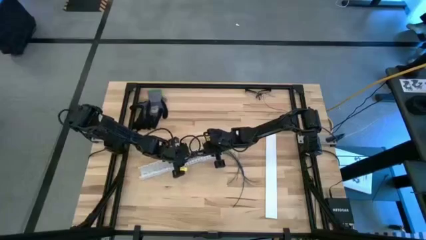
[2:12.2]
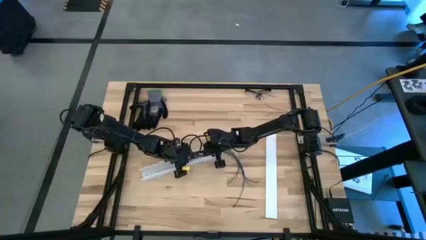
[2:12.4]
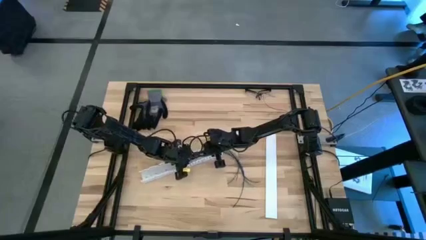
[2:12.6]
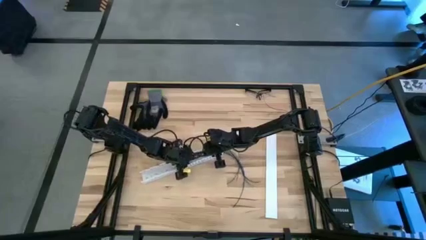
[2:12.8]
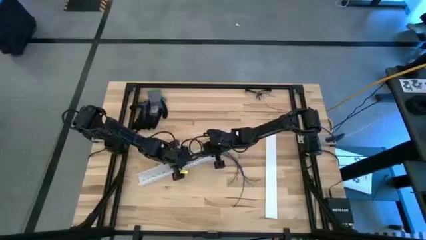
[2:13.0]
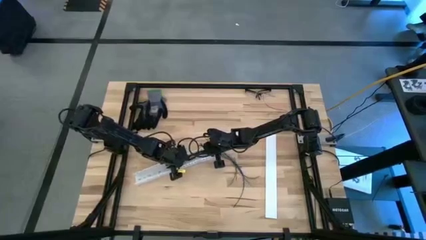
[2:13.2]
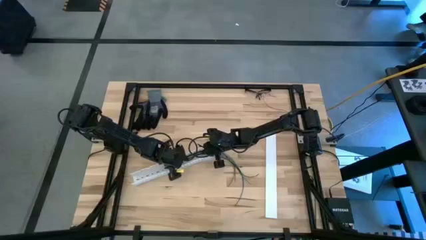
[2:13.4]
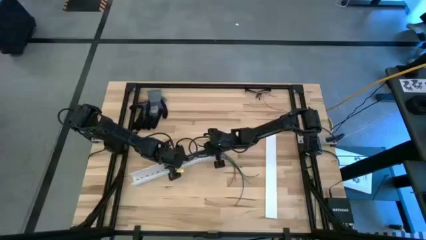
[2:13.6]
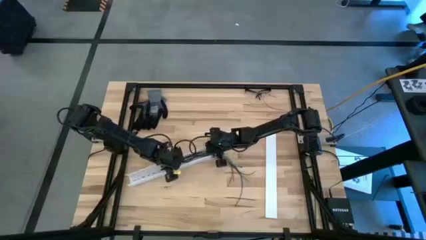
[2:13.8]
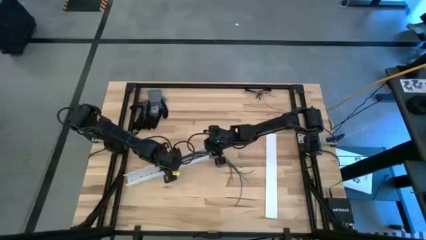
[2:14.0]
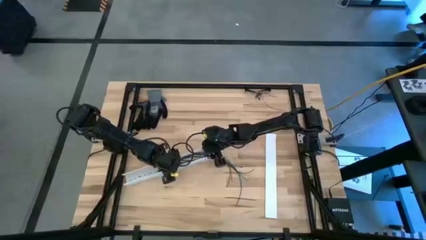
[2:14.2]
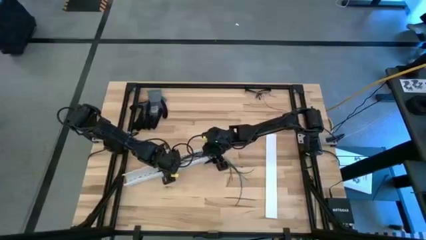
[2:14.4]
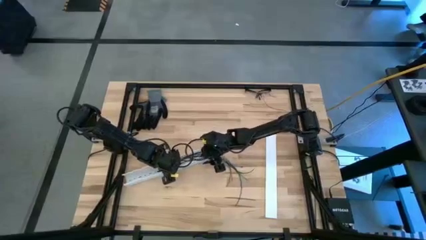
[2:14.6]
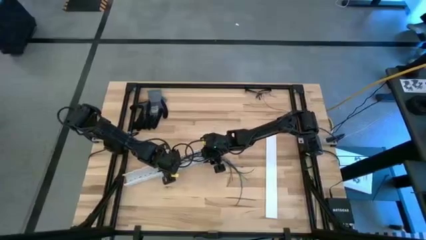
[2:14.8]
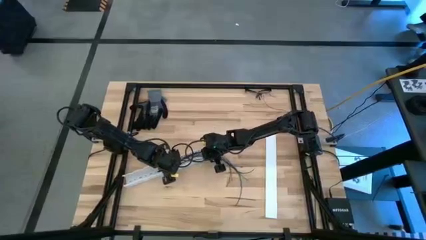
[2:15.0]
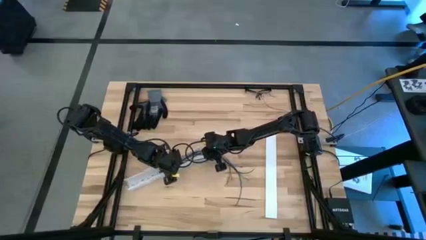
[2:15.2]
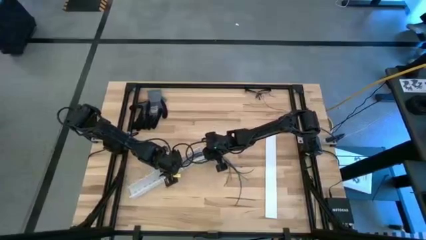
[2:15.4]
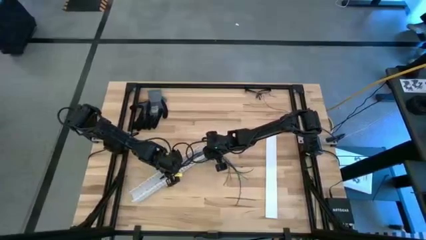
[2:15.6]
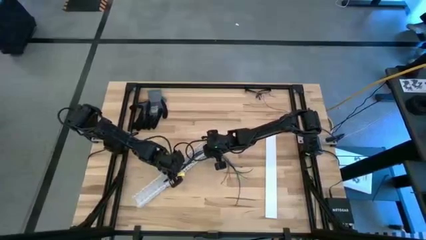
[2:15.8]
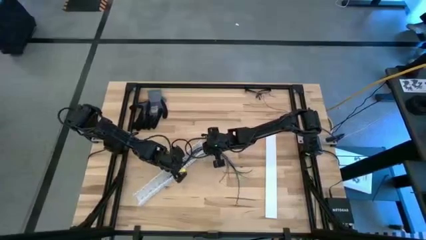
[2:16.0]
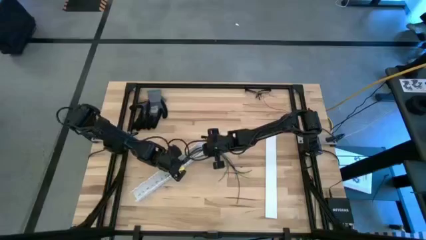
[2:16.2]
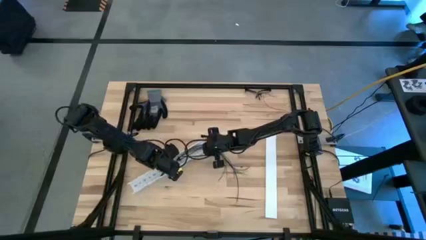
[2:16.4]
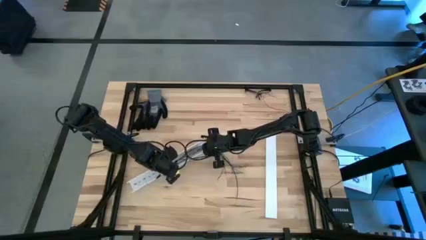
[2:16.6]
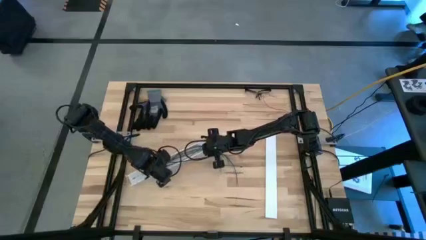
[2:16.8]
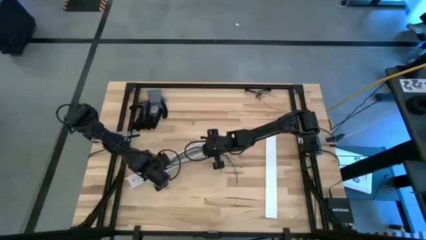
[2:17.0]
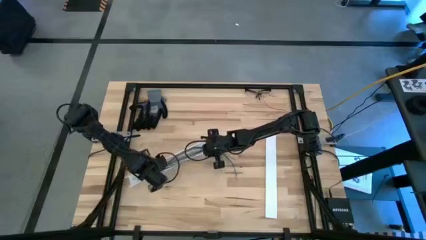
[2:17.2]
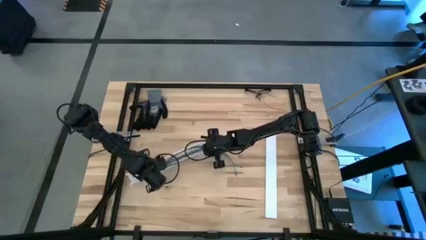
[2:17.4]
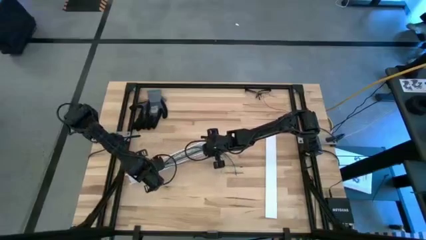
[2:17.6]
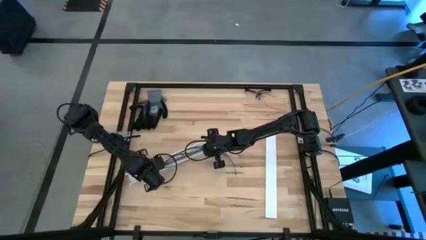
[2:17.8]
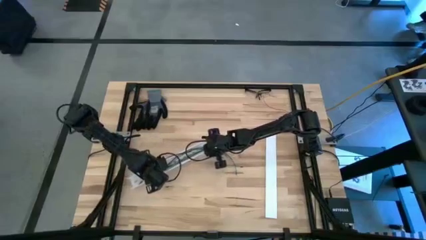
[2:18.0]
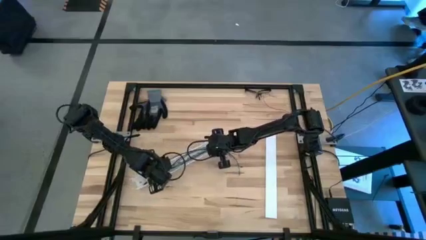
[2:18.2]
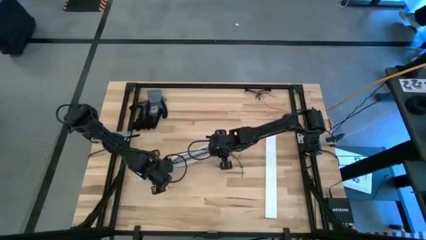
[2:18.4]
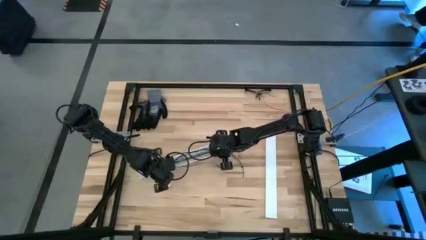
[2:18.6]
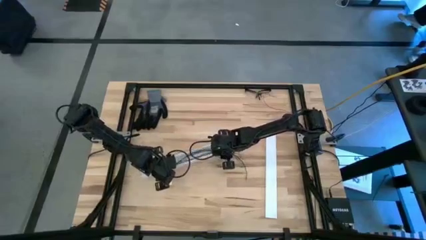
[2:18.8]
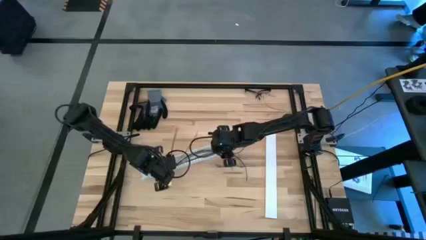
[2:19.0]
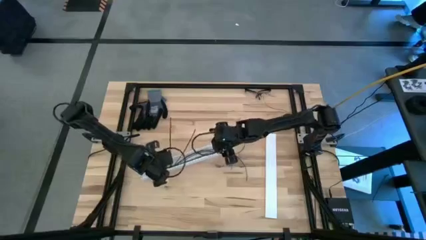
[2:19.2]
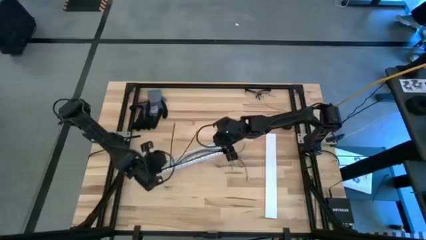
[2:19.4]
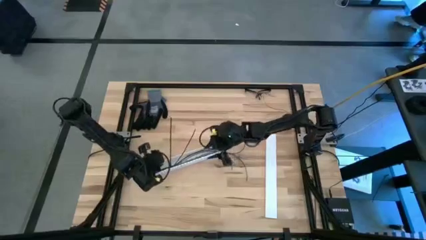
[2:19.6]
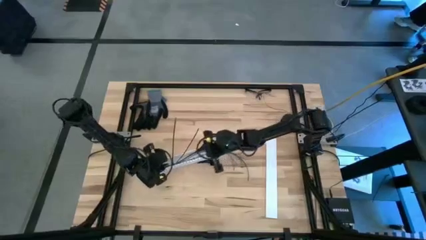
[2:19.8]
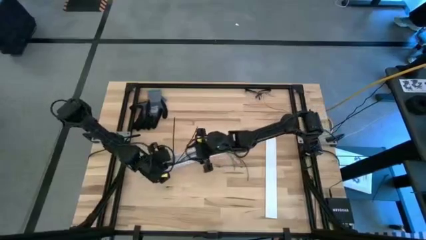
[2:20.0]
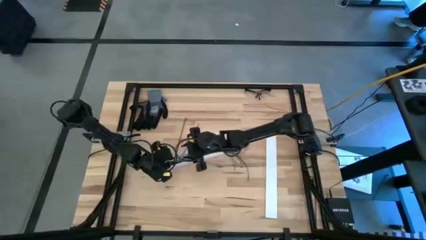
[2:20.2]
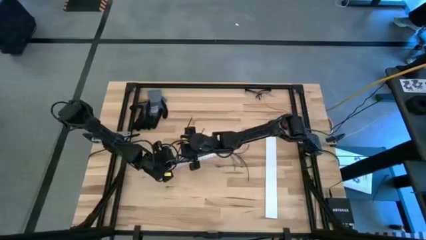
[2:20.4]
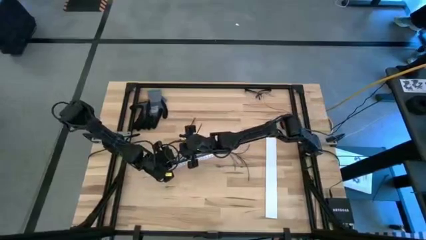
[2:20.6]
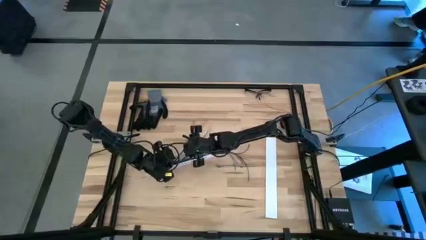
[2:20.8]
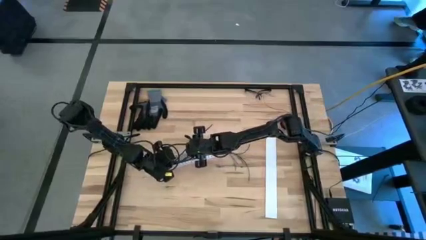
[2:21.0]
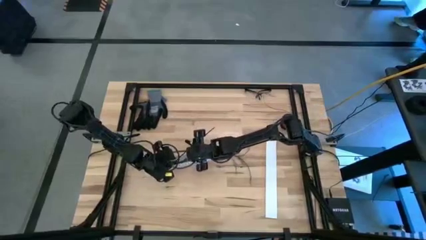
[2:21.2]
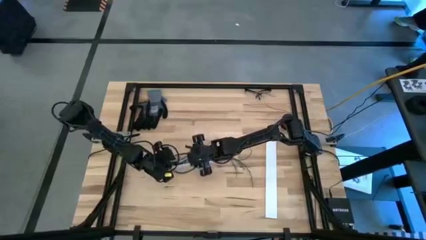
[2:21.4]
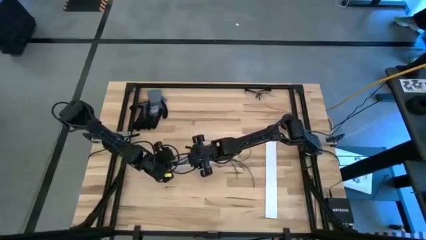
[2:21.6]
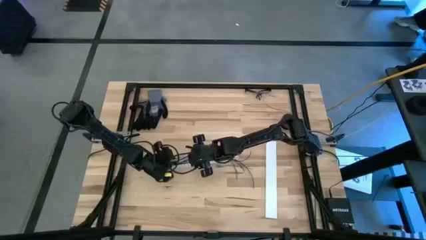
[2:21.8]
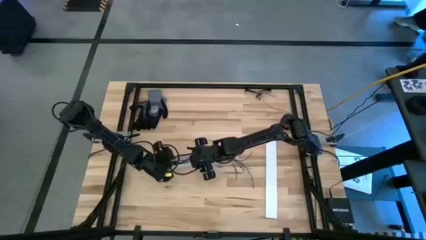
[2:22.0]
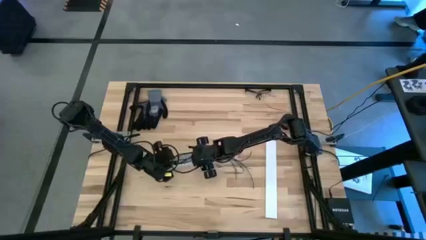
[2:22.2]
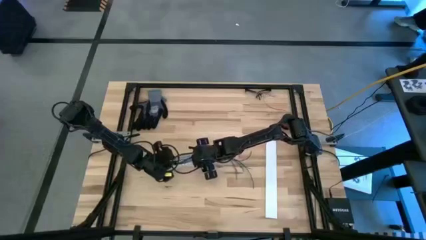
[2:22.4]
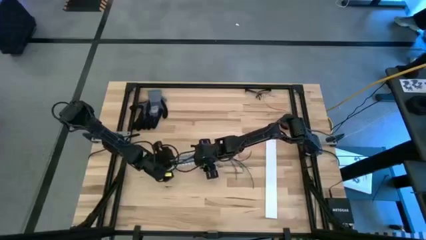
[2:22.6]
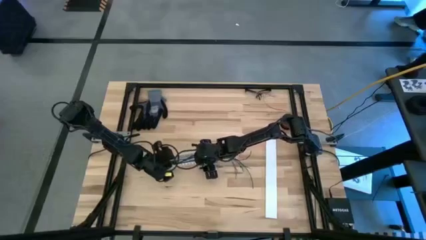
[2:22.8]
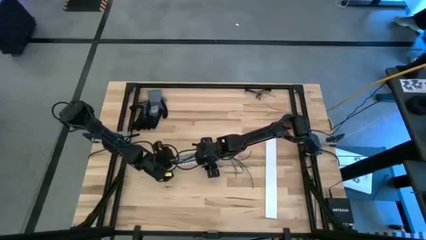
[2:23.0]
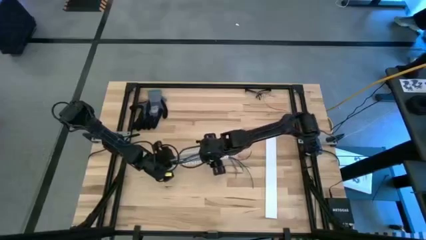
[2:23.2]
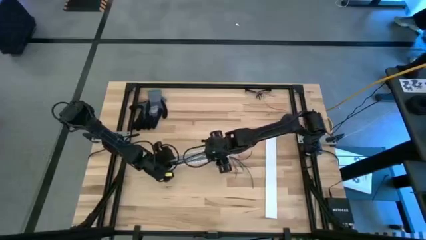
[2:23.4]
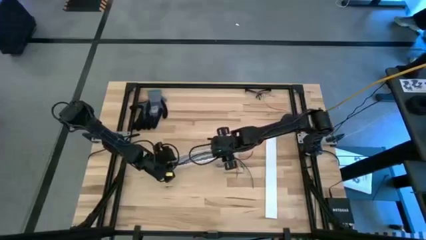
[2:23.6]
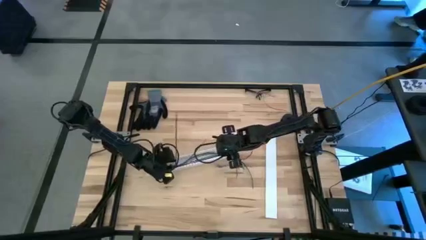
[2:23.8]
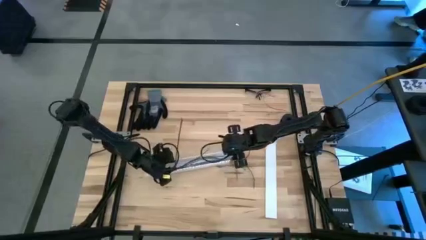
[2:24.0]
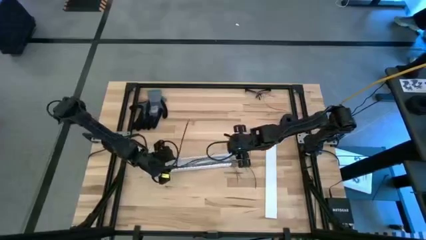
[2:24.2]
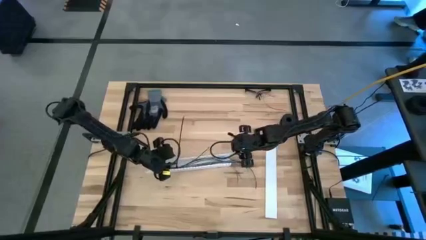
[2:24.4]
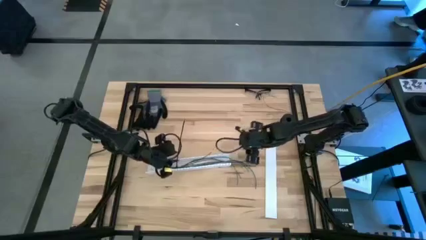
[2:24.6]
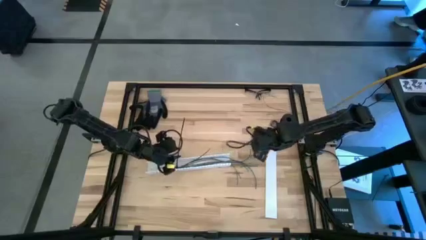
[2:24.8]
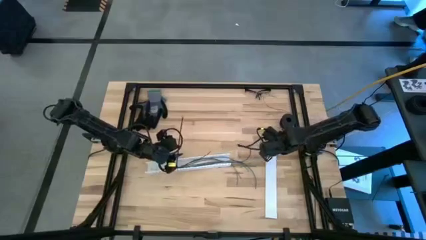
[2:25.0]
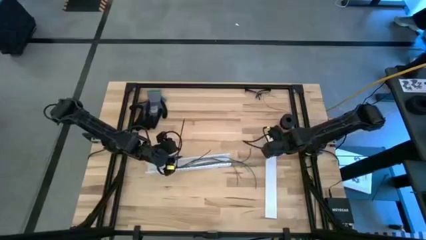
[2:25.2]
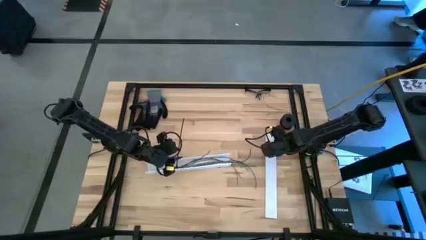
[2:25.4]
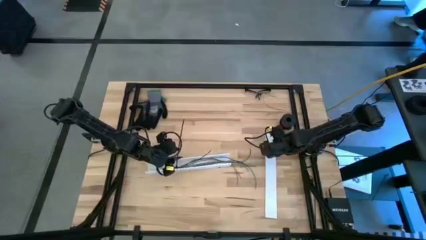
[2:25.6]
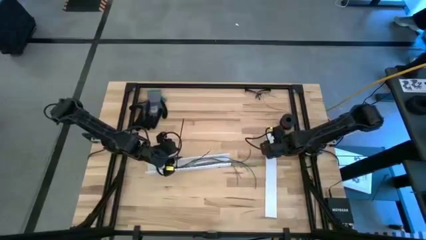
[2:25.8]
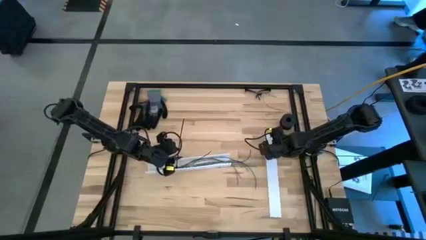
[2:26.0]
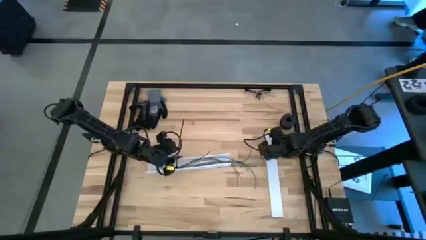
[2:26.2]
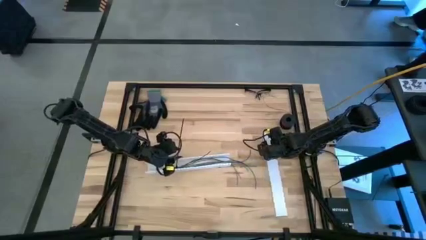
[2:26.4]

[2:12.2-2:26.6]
Task: Ziptie cables
Put the colored ziptied cables into the white cable duct

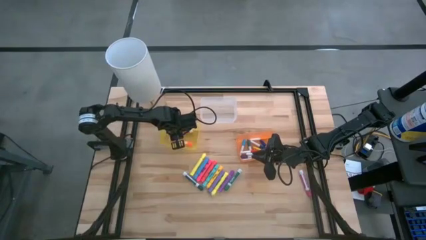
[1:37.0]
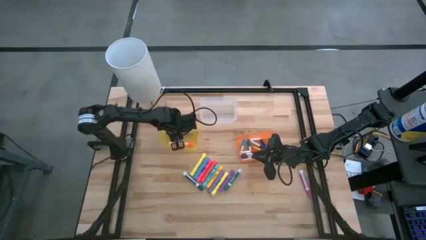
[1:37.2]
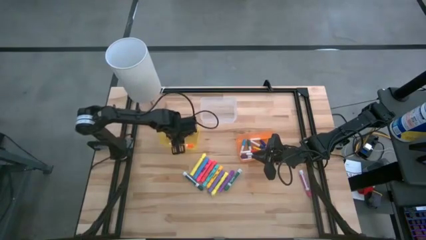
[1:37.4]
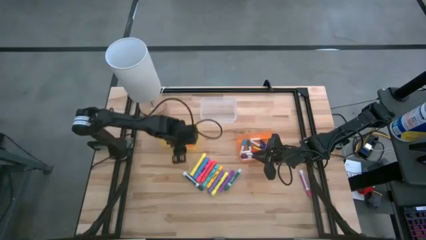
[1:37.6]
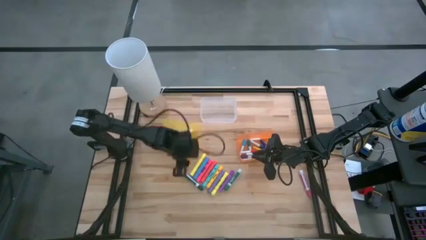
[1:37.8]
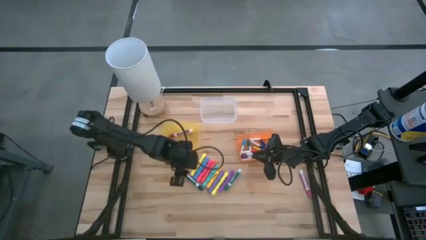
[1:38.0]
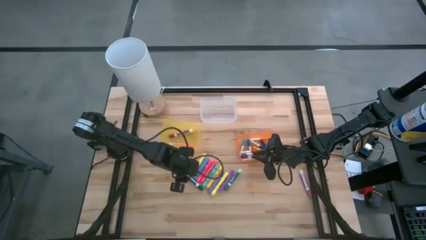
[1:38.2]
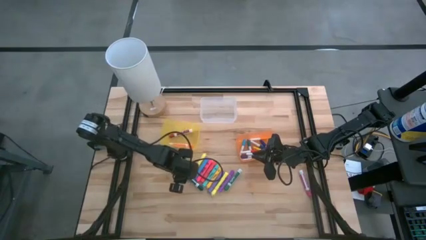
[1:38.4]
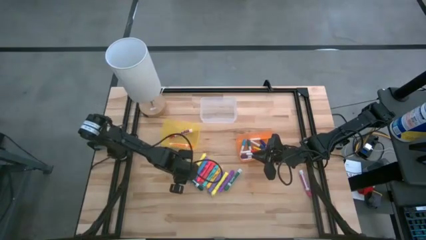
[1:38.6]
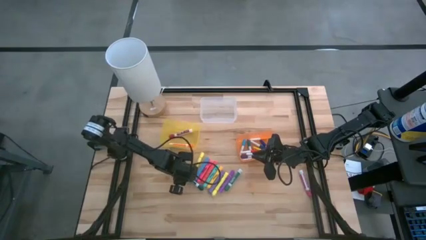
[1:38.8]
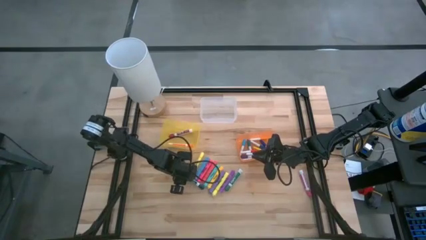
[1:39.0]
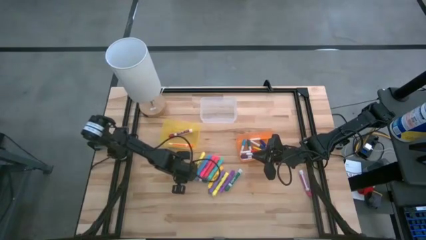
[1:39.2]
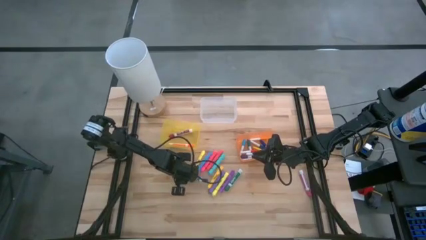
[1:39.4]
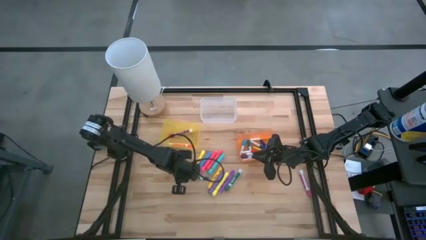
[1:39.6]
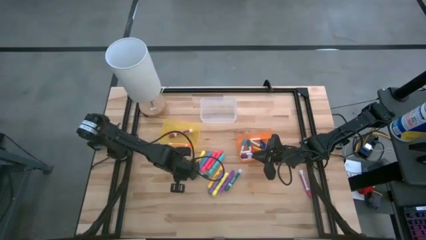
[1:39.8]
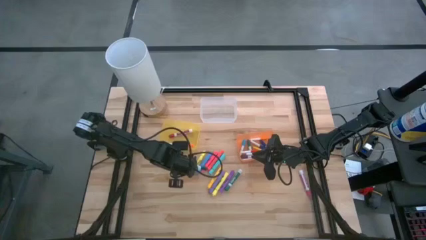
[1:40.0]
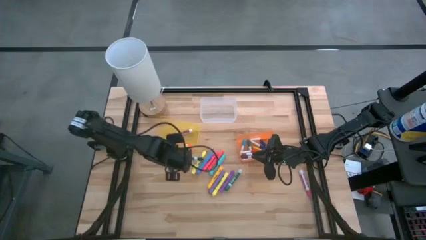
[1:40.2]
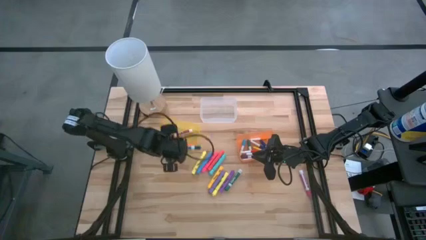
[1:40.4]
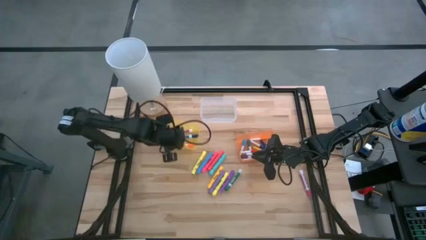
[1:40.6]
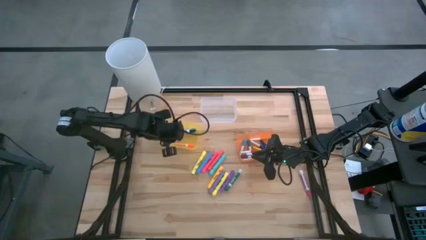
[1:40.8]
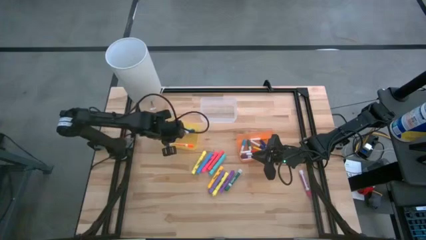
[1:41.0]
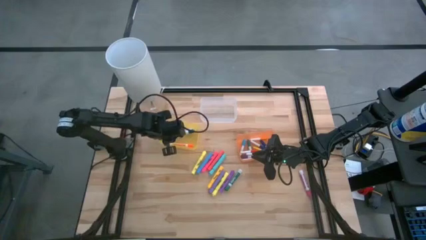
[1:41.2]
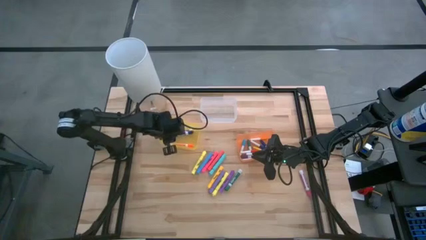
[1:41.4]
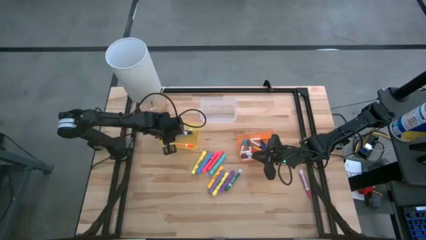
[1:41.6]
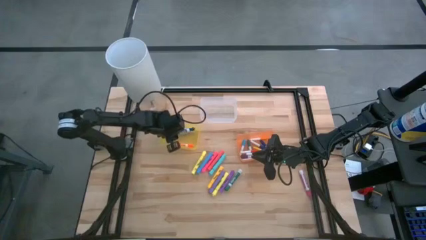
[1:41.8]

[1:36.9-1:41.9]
Task: Pick & Place Markers
Put the left green marker pen into the transparent yellow bin
